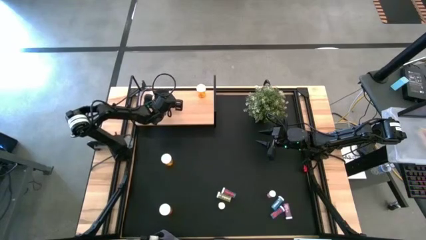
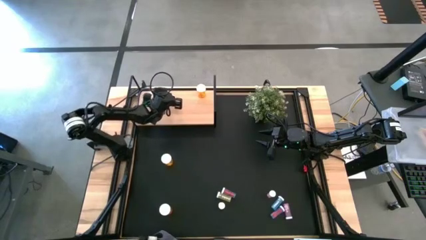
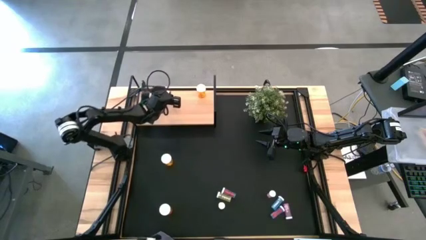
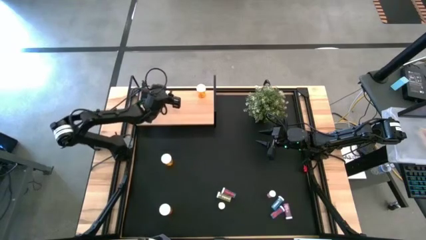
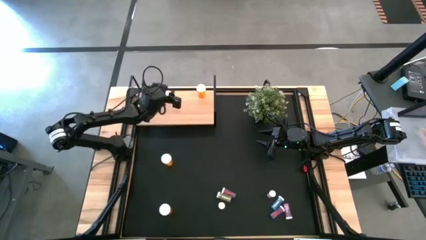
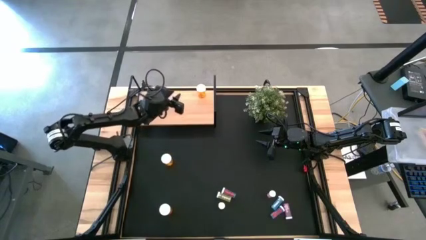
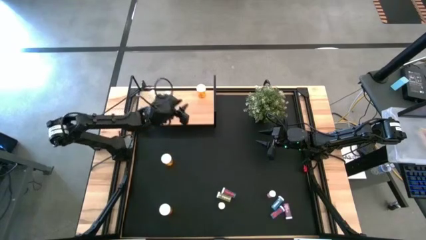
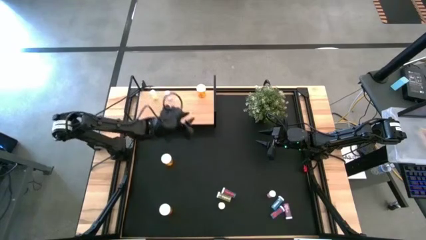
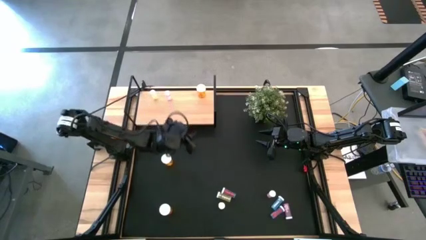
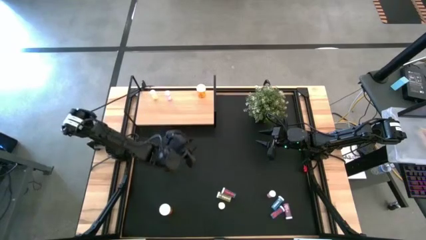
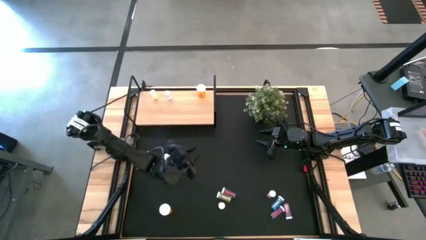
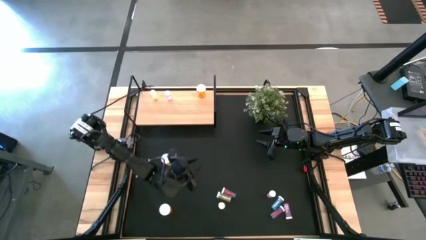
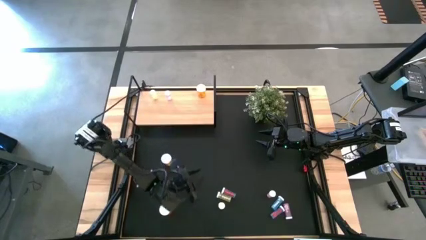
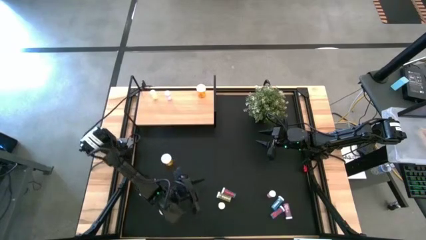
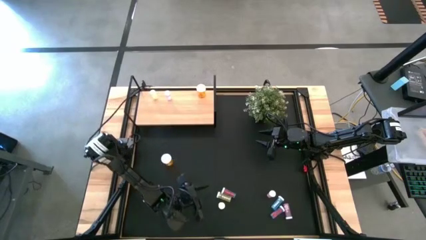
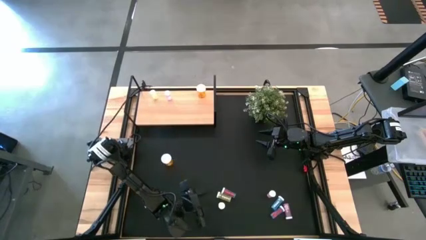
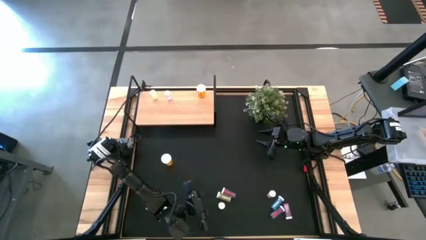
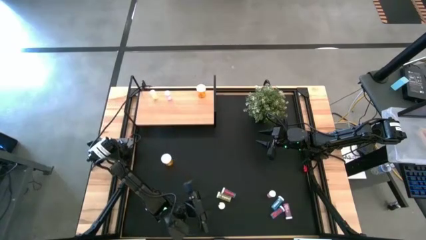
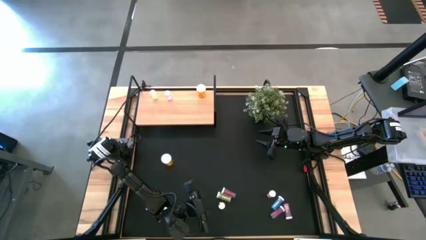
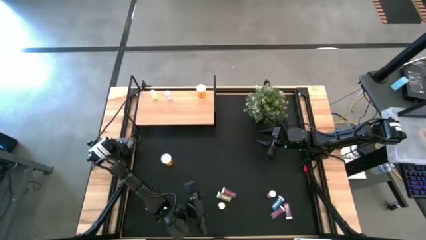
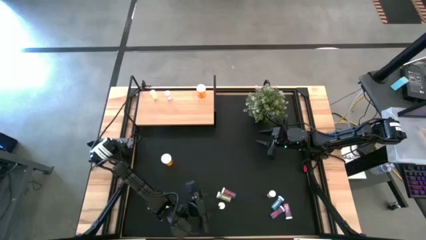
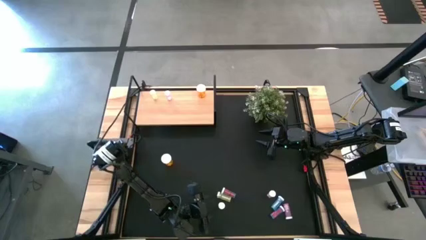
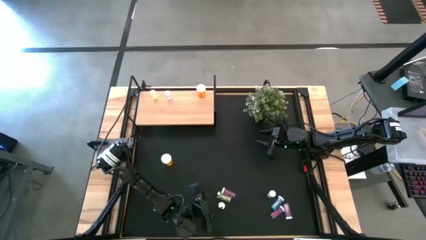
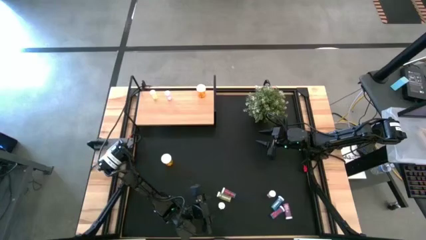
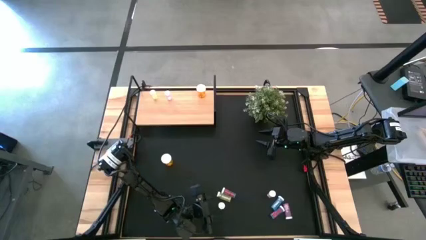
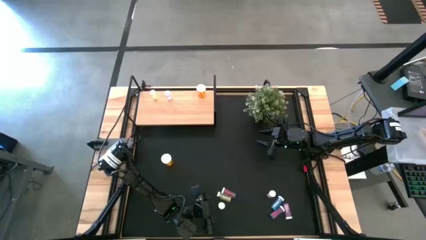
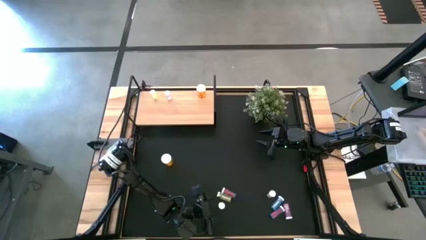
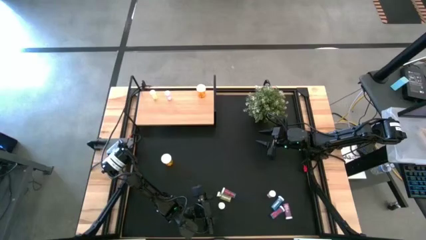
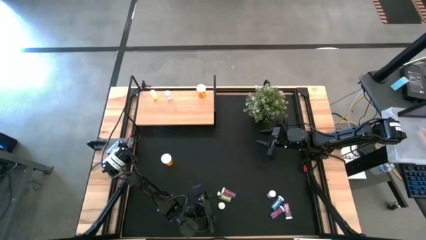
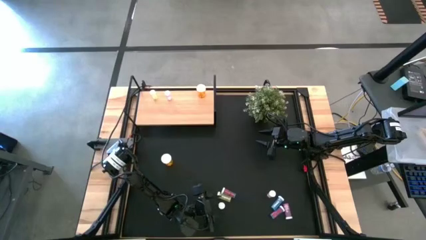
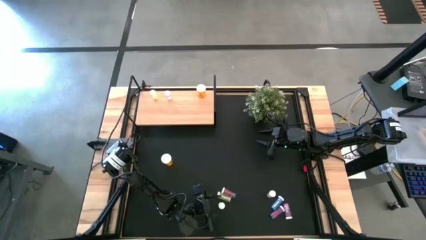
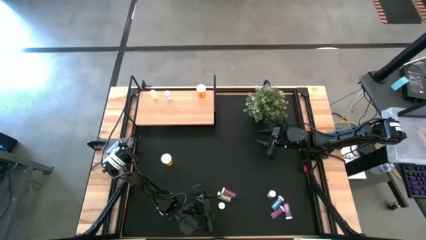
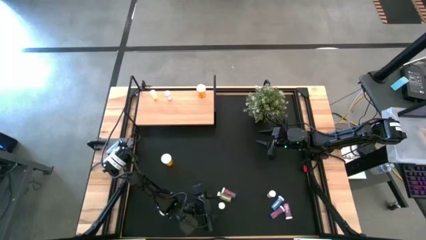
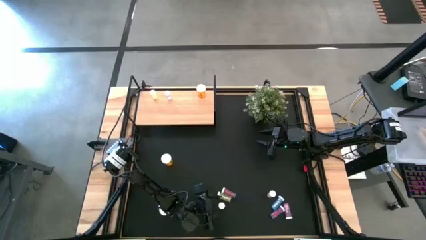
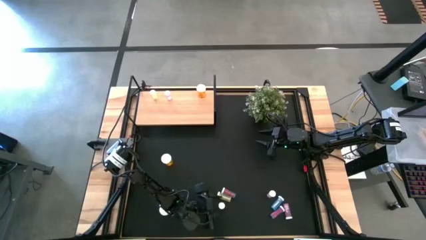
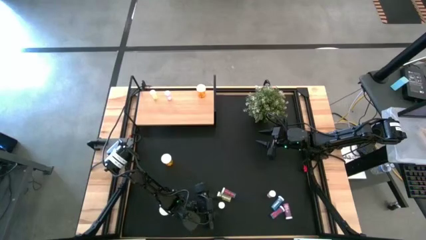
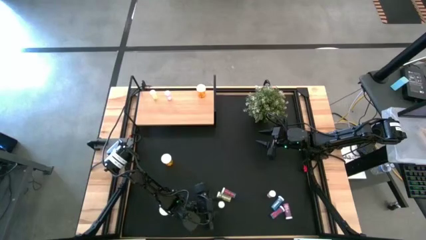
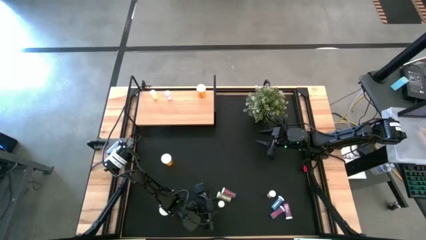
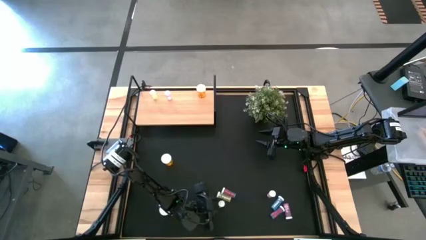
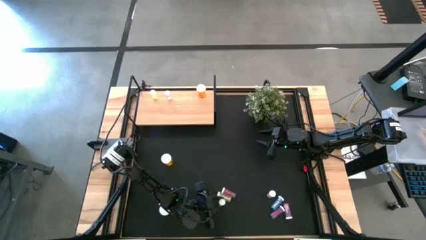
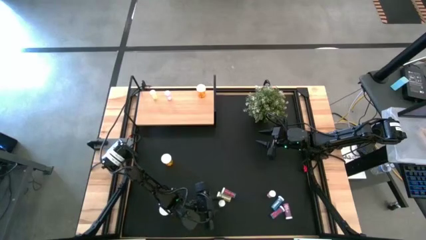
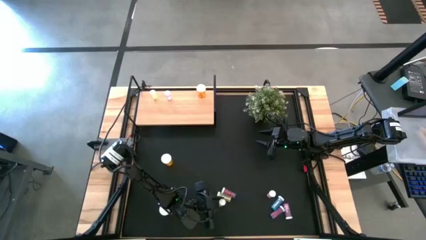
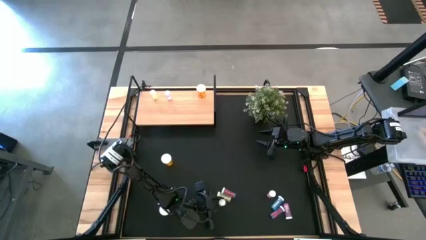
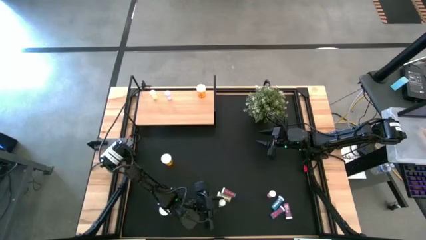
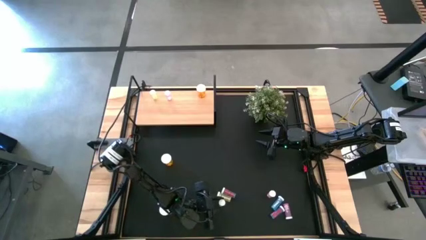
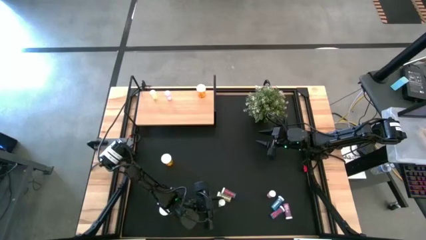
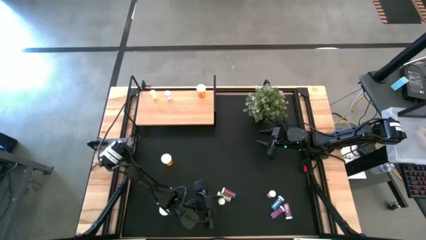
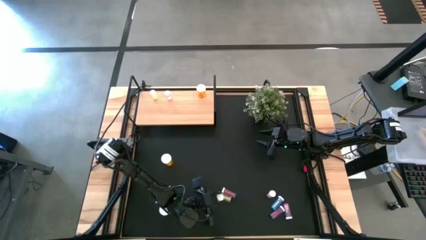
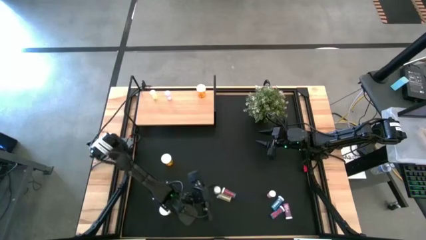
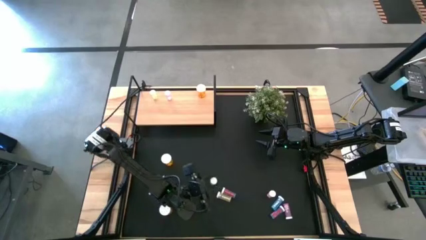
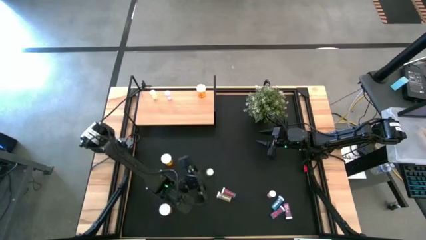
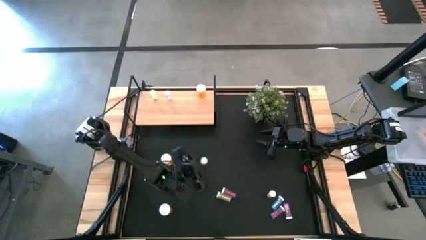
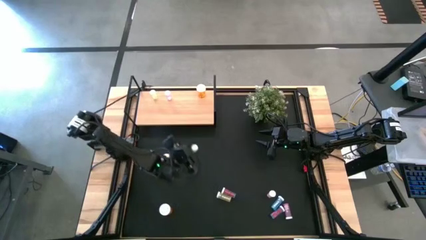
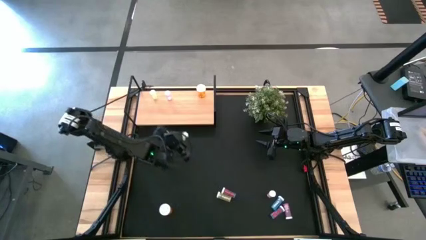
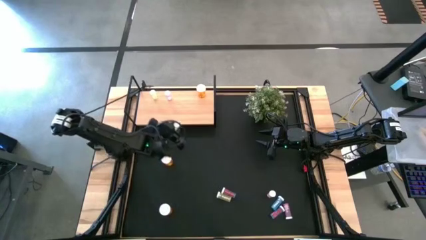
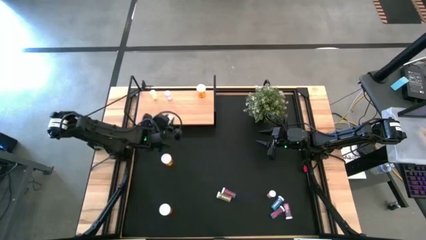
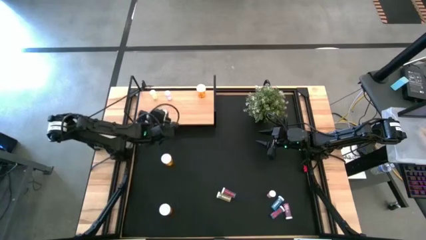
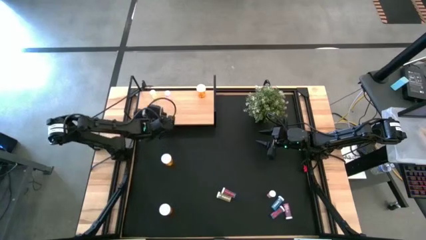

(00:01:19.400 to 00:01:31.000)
Task: Pick and place medicine bottles onto shelf by color
Put the bottom yellow medicine bottle on the shelf aligned with the other yellow medicine bottle

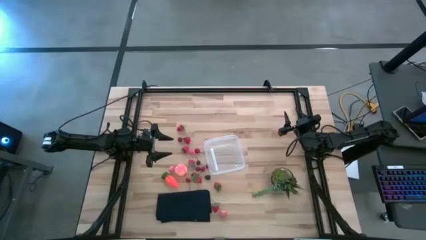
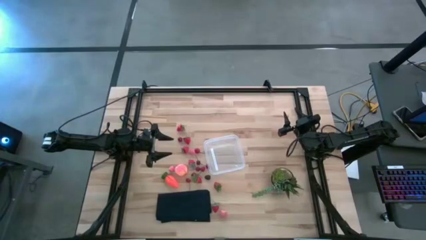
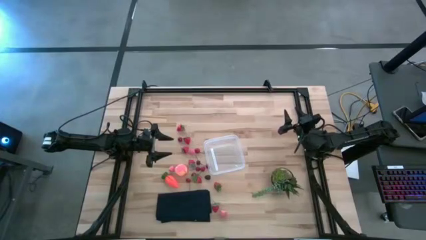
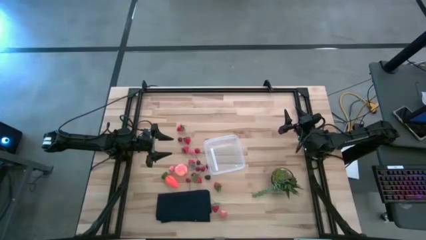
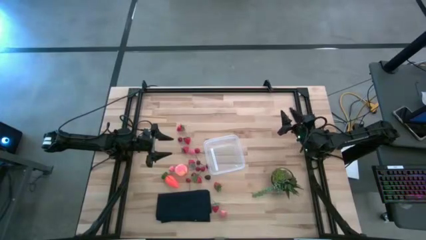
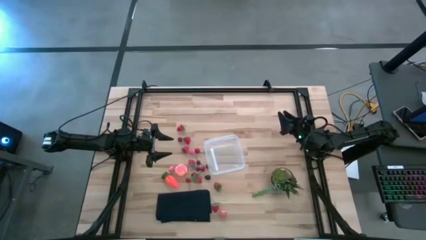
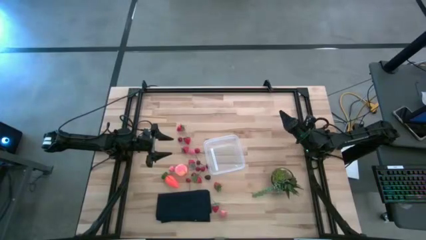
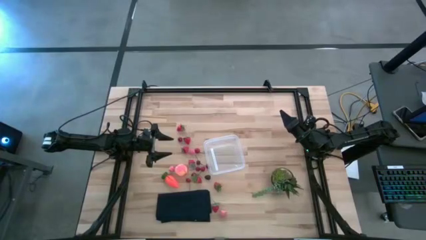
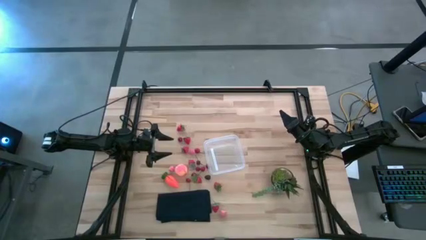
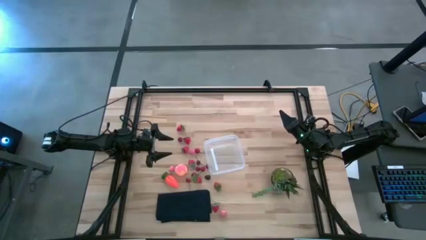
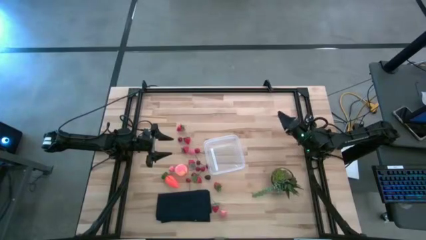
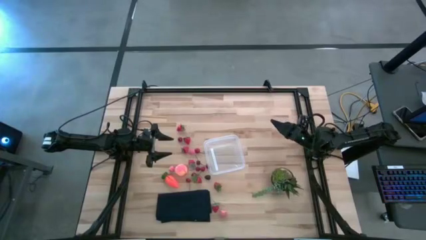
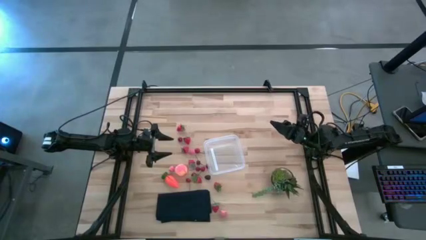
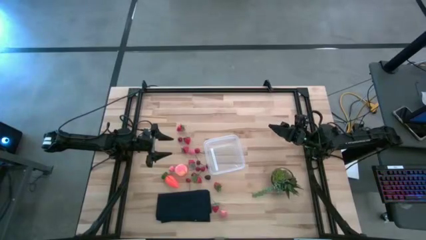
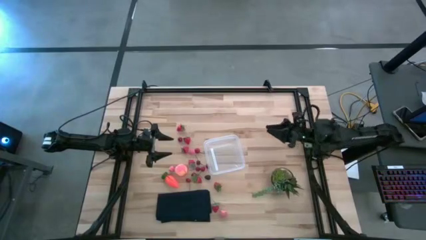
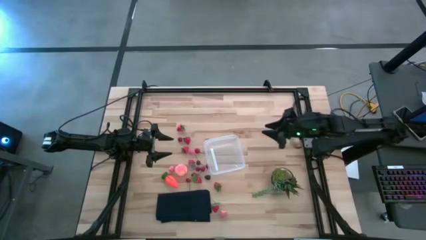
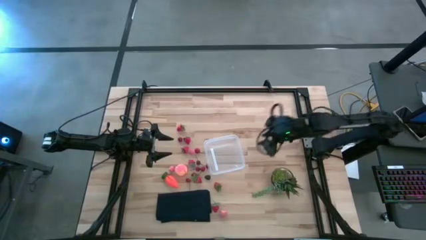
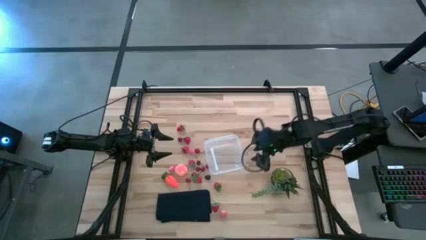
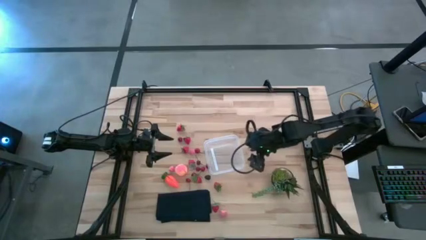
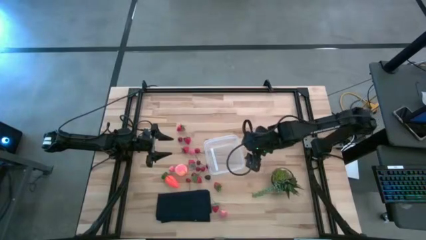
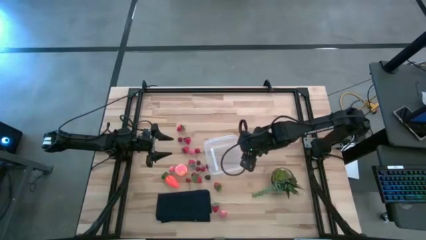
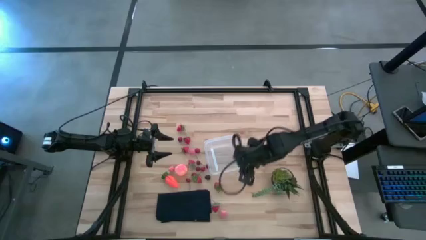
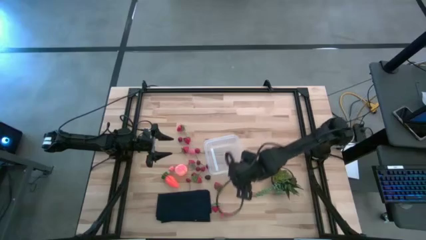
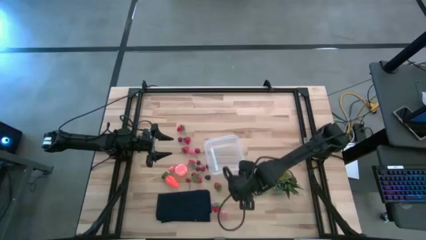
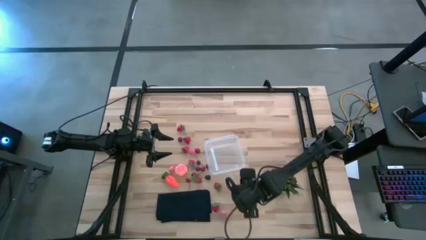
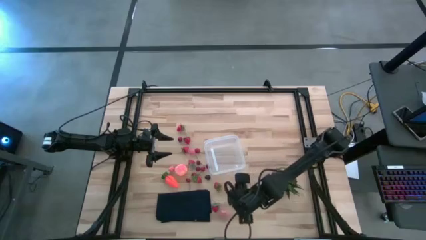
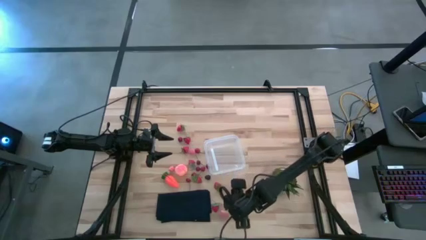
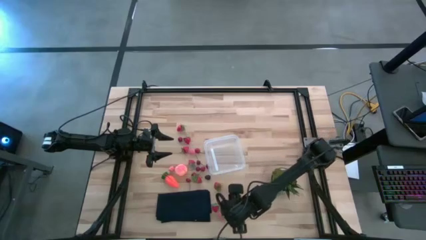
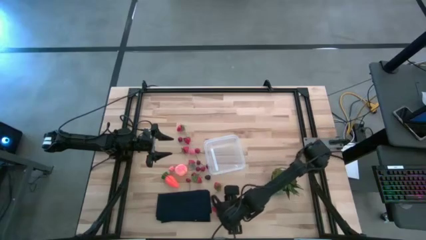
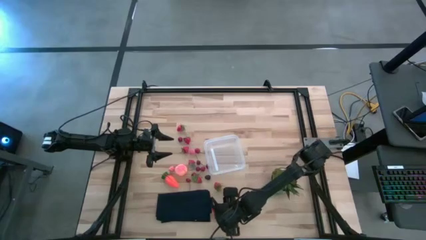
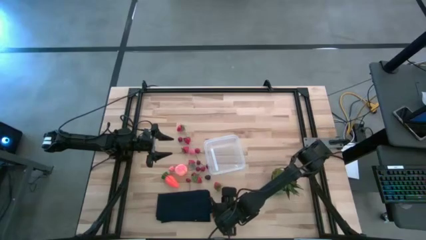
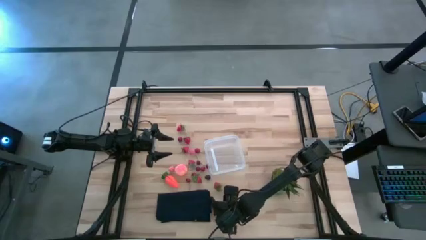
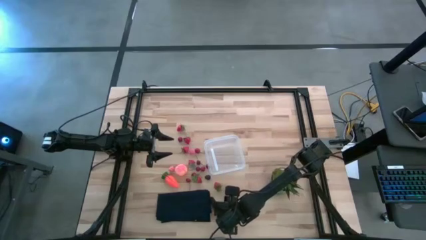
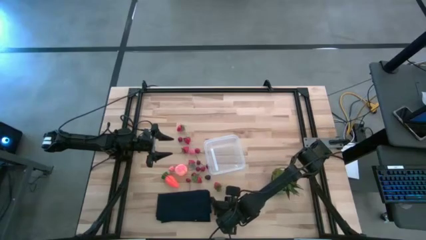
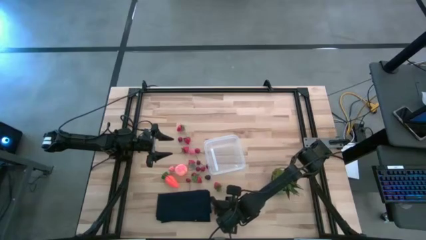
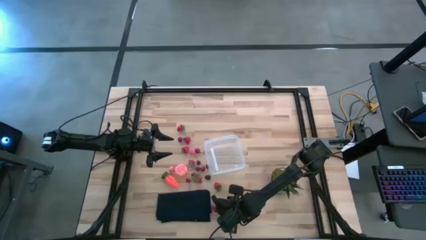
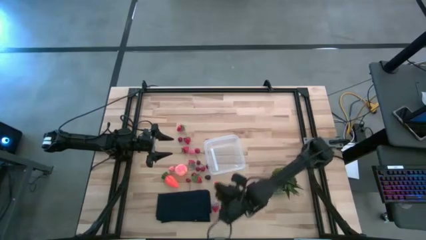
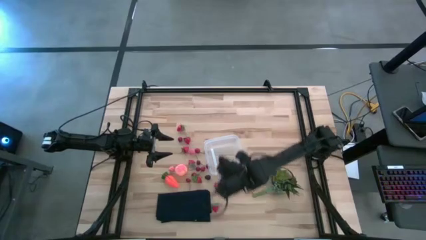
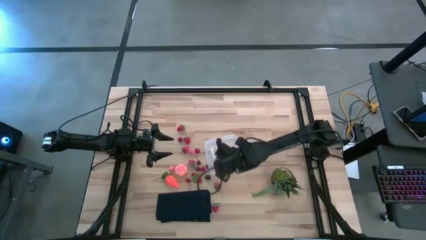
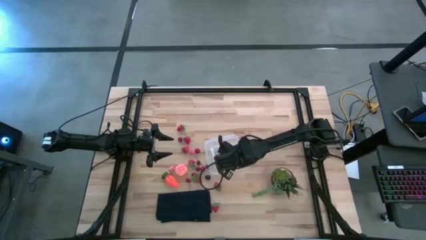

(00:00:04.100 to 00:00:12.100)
Task: Pick and placing Produce into tupperware
Put the pink peach into the container
